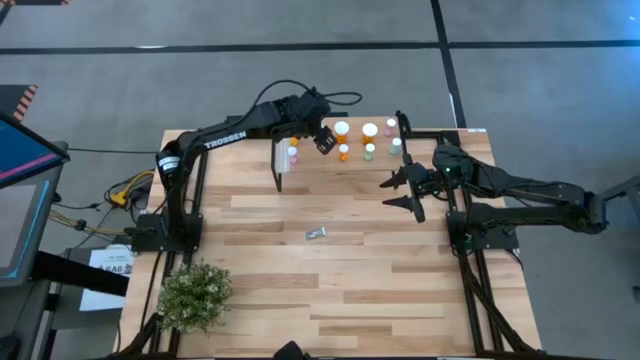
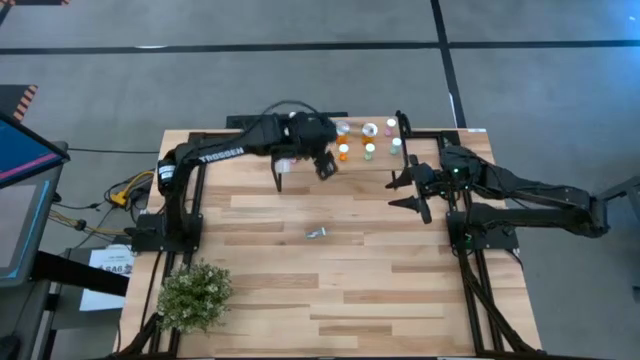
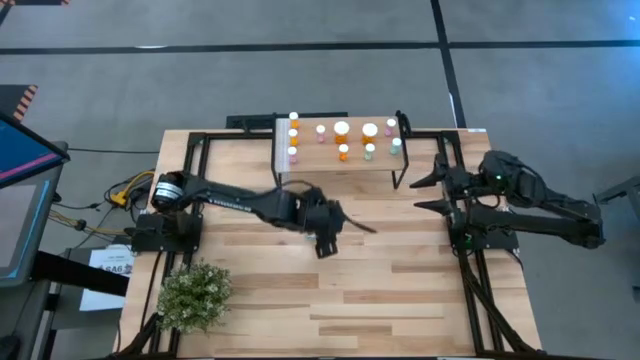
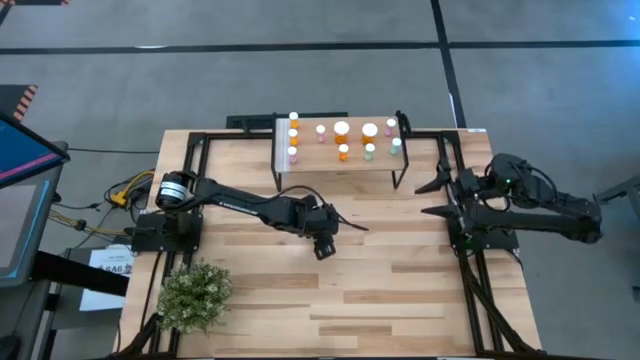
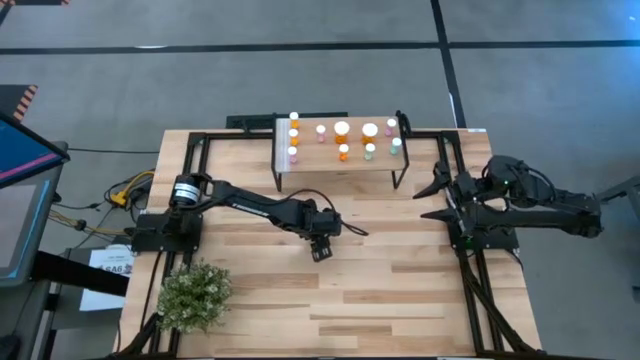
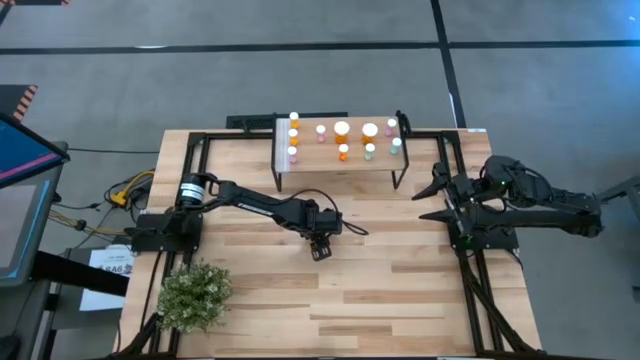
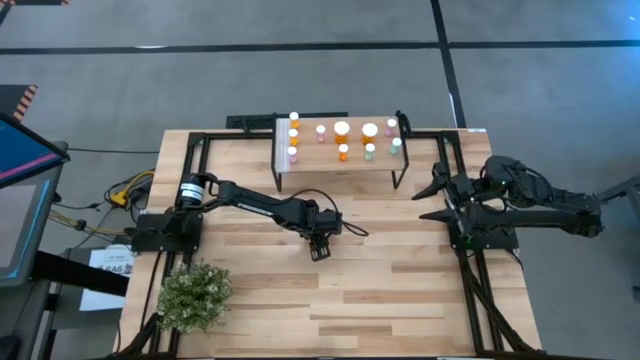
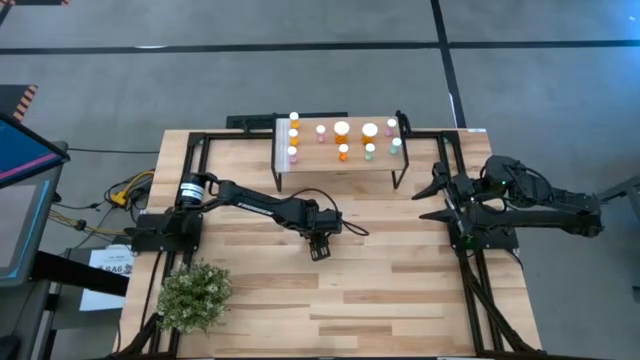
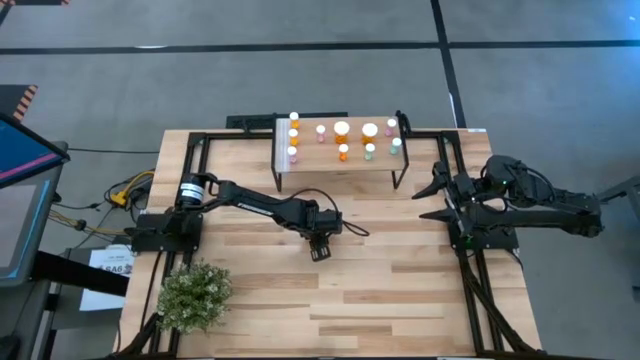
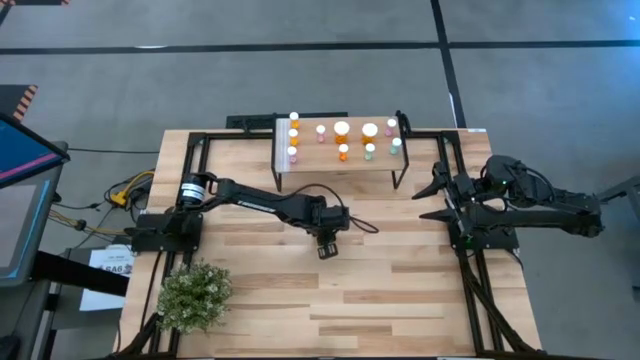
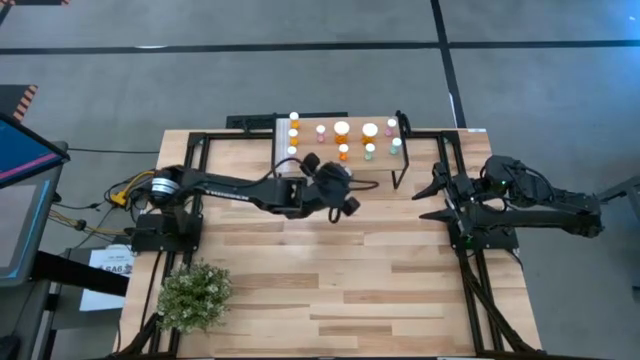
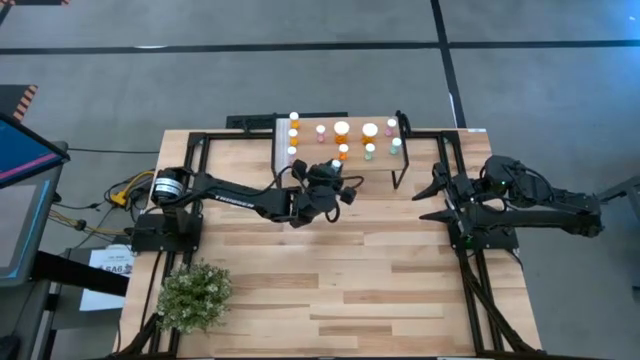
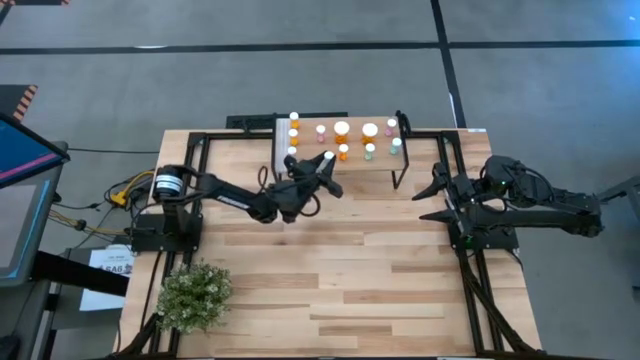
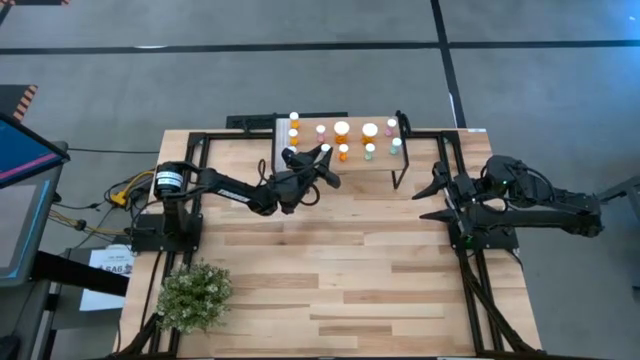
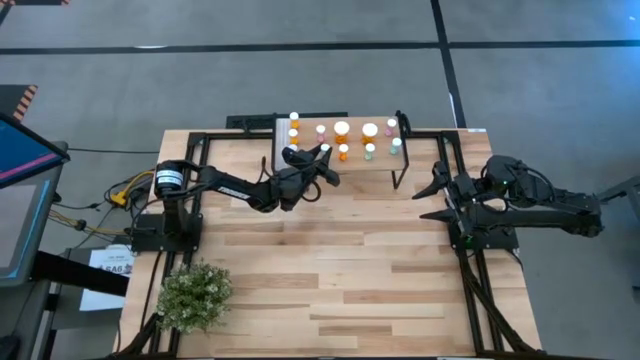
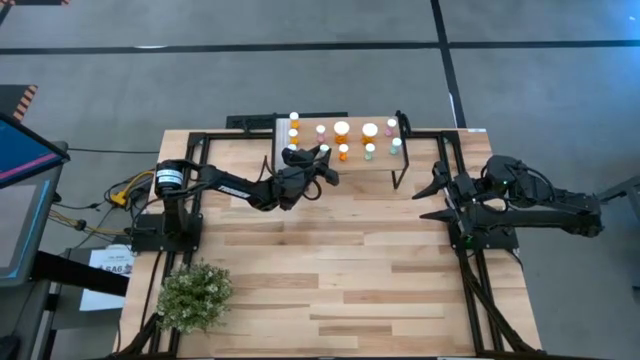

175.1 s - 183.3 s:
Task: Pick and place medicine bottles onto shelf by color
Put the small blue pill bottle on the shelf

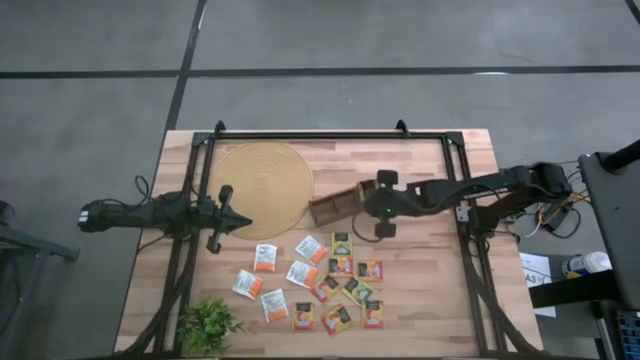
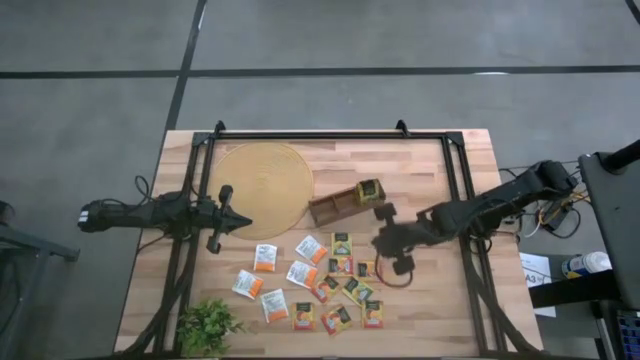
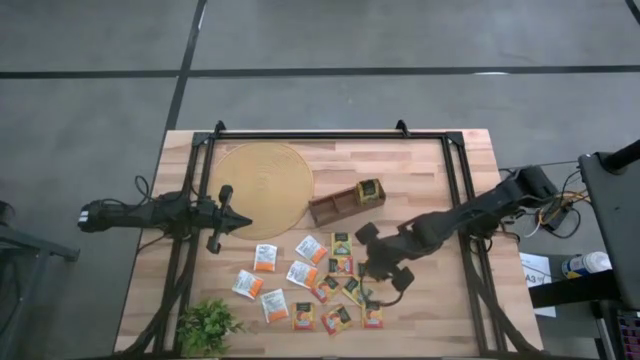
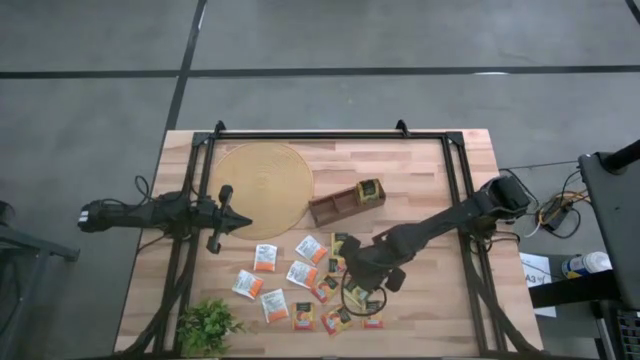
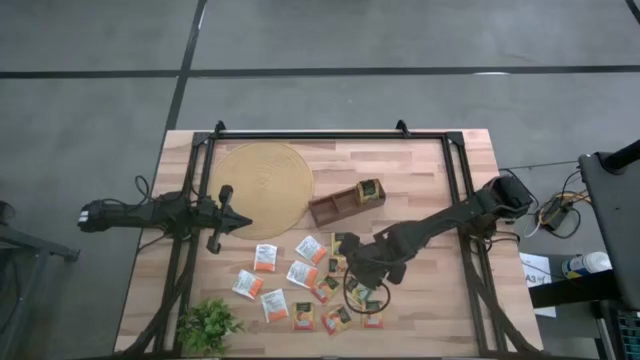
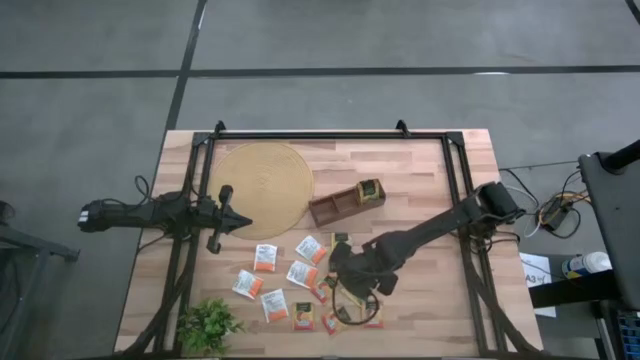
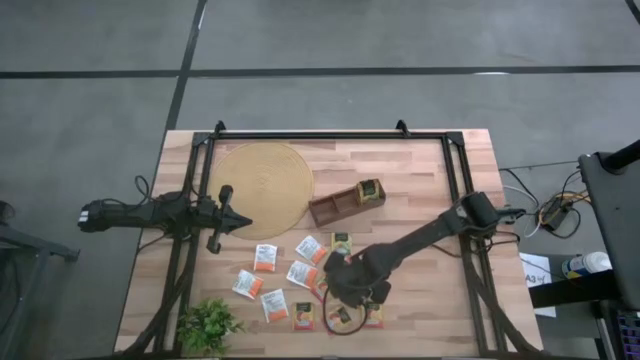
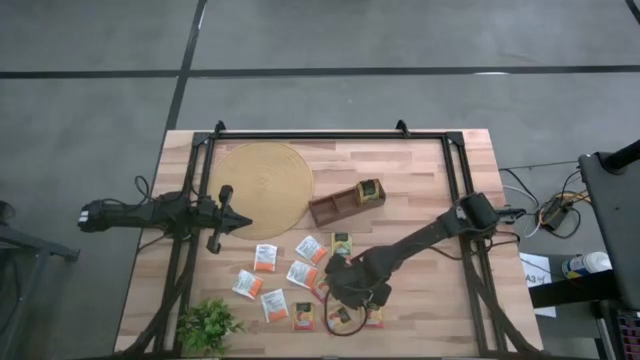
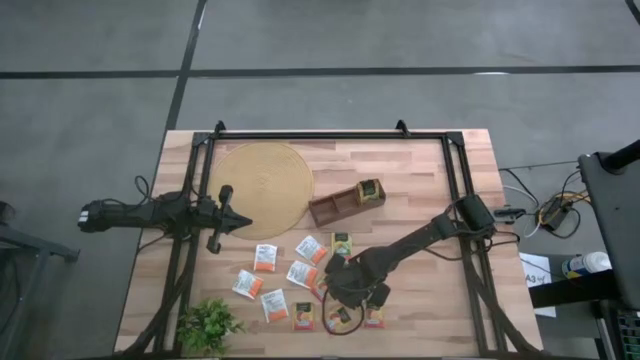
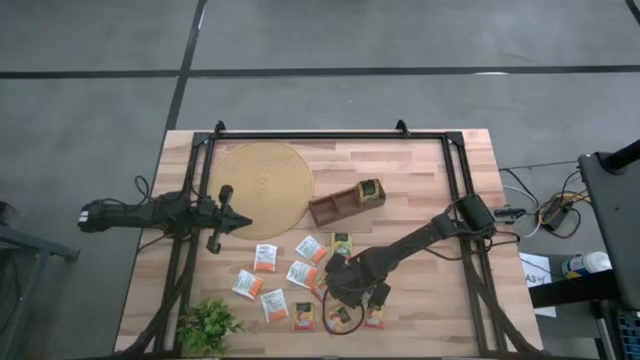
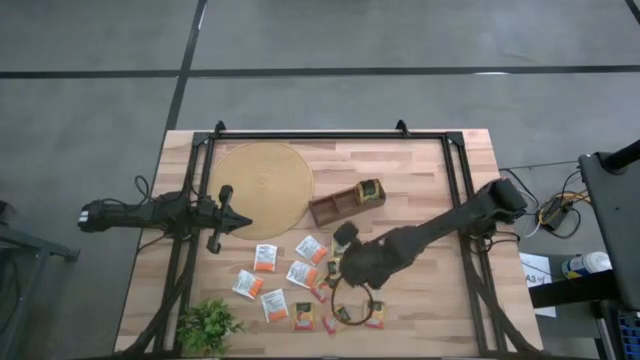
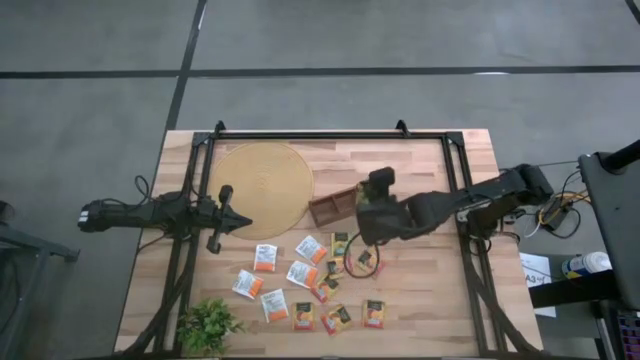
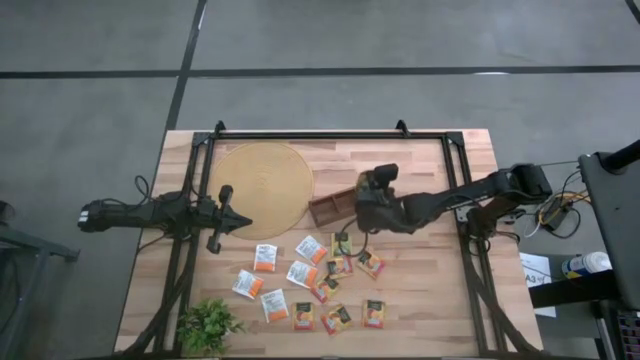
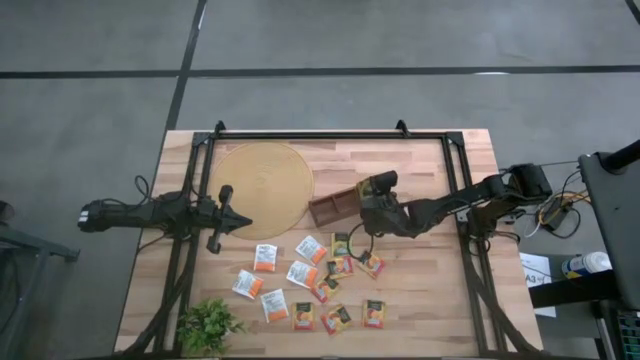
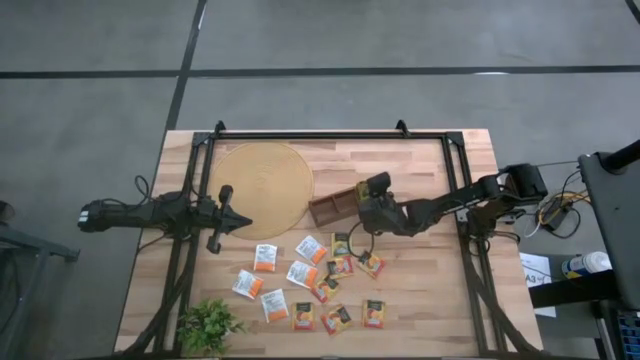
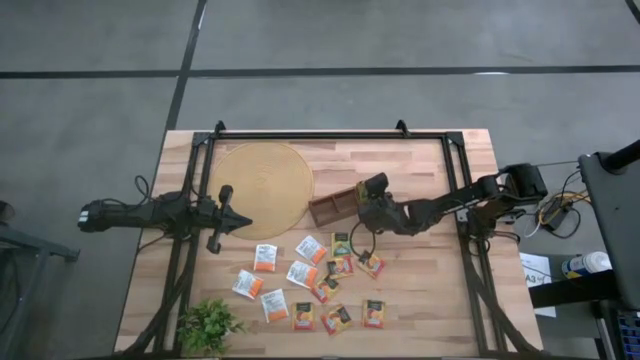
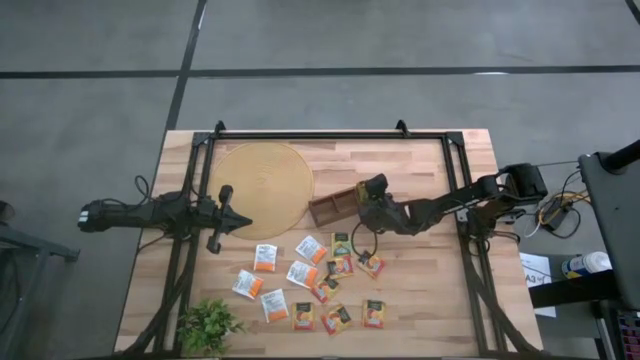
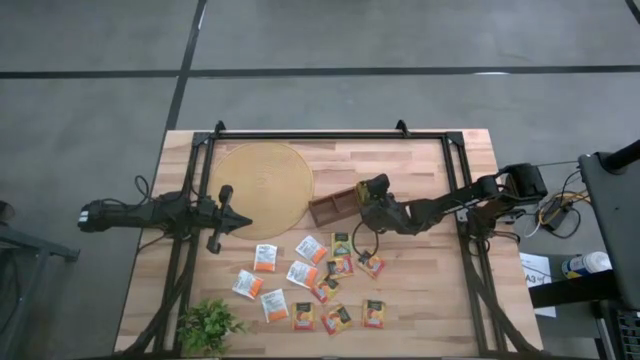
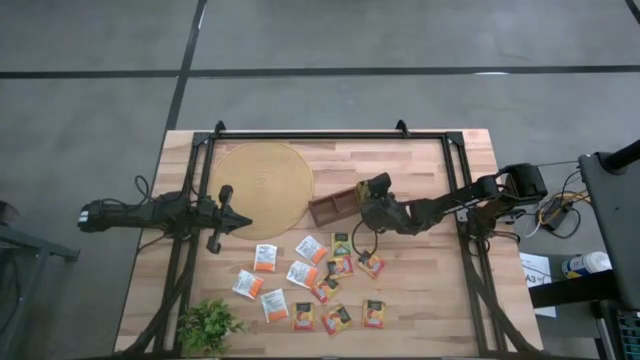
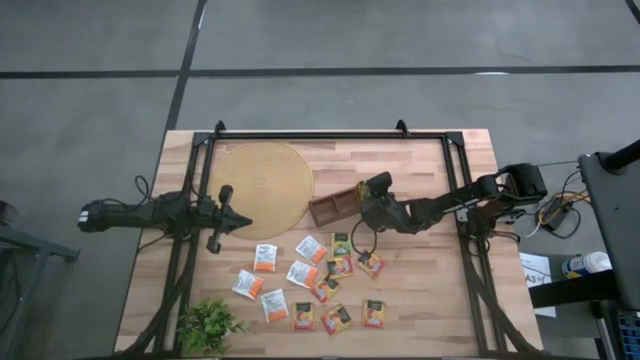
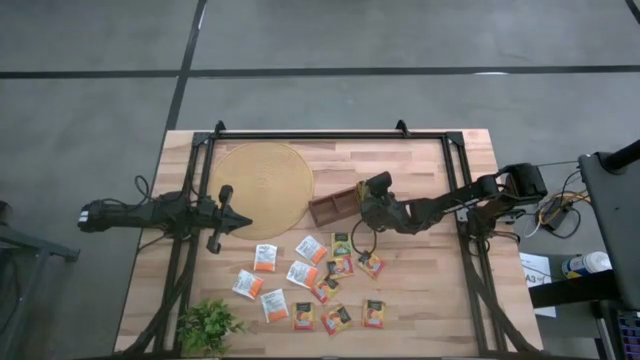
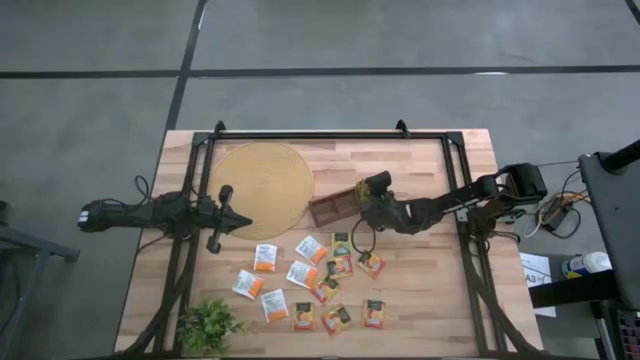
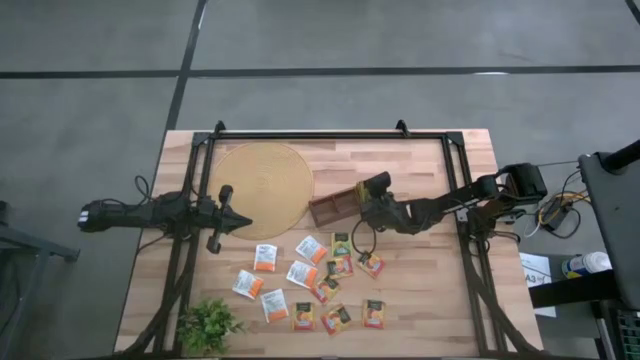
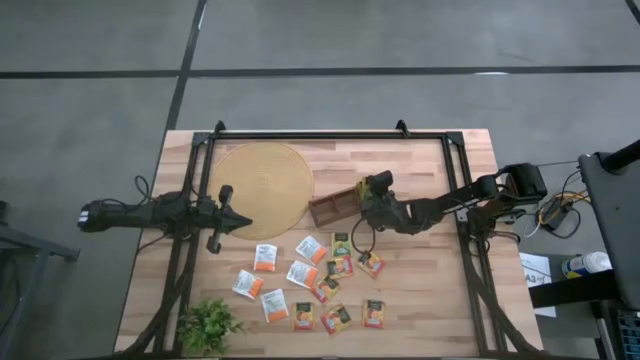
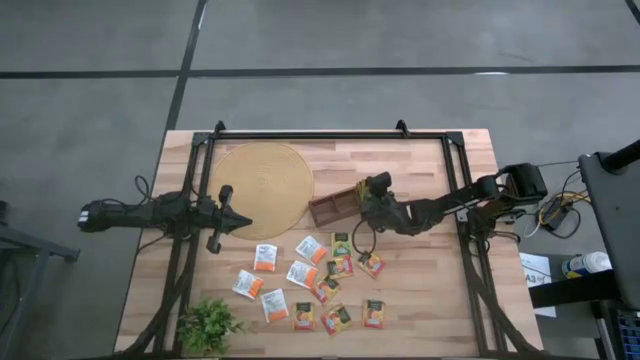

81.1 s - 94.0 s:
Task: Pick & Place Tea
Put the yellow tea bag into the right section of the wooden organizer
